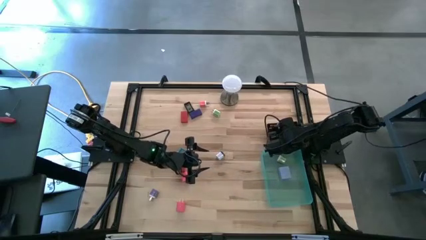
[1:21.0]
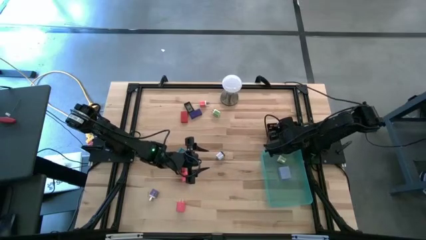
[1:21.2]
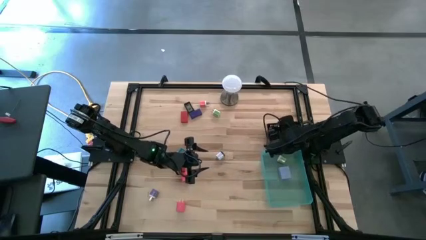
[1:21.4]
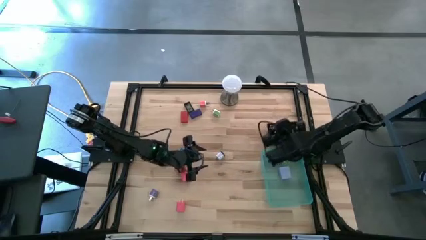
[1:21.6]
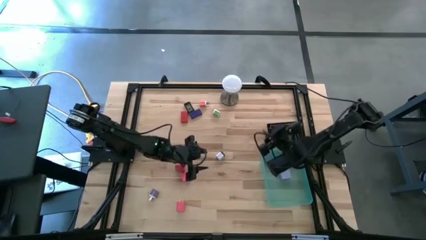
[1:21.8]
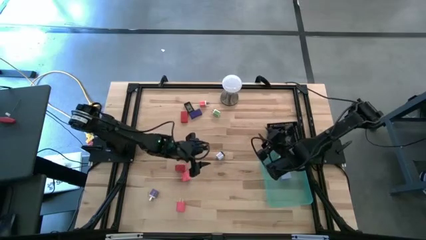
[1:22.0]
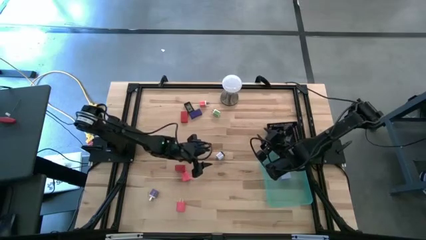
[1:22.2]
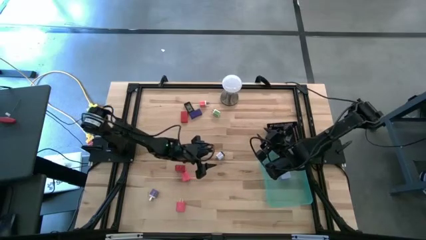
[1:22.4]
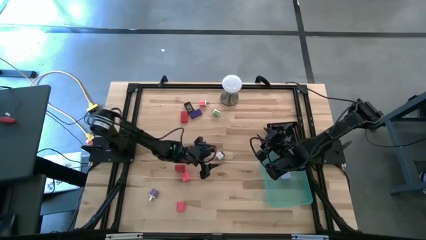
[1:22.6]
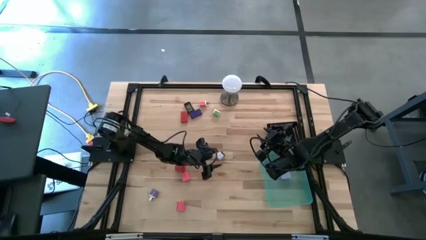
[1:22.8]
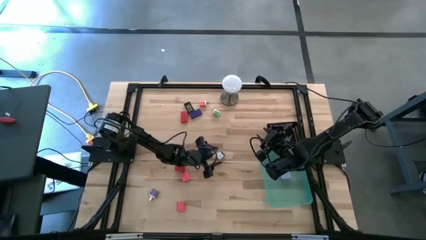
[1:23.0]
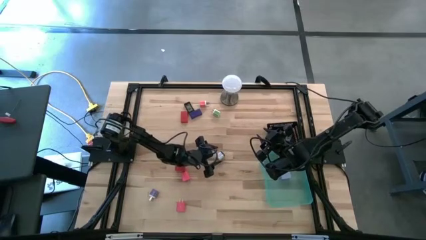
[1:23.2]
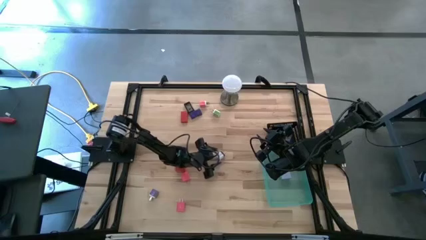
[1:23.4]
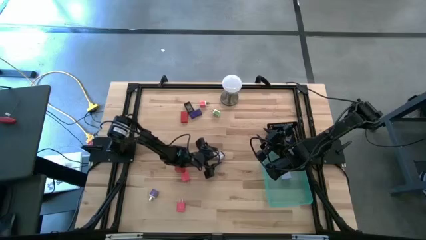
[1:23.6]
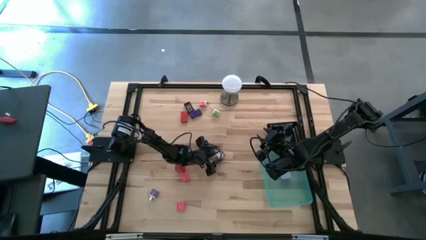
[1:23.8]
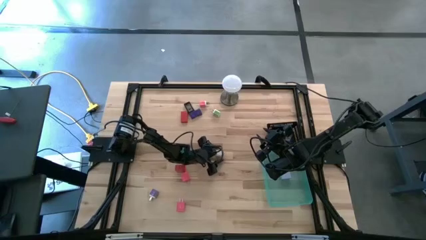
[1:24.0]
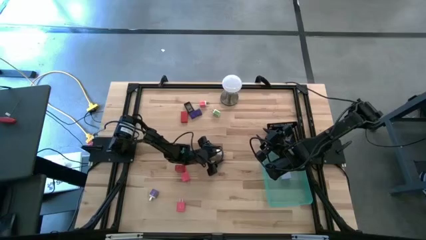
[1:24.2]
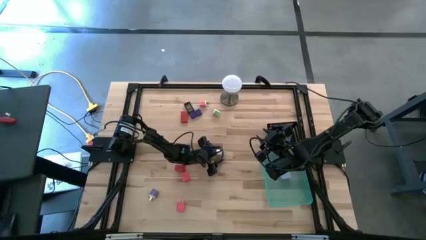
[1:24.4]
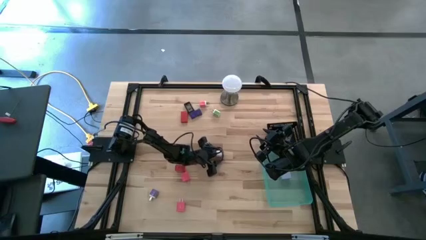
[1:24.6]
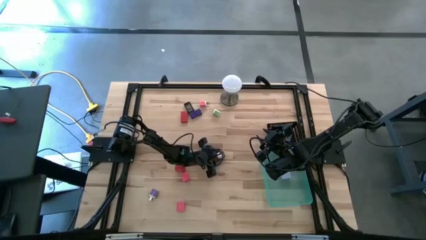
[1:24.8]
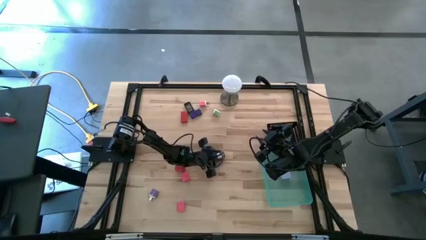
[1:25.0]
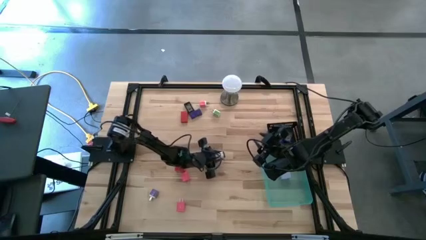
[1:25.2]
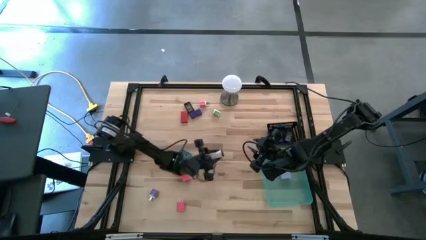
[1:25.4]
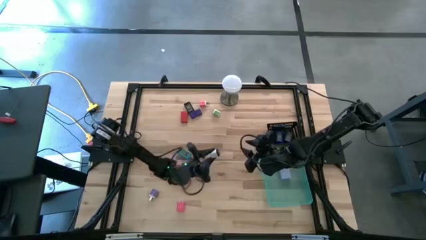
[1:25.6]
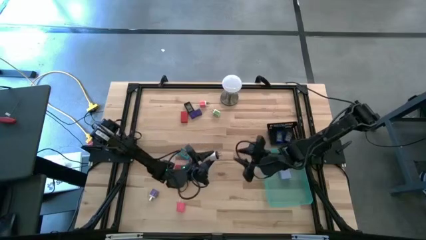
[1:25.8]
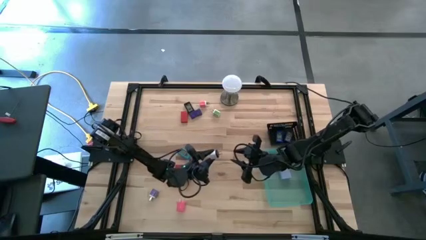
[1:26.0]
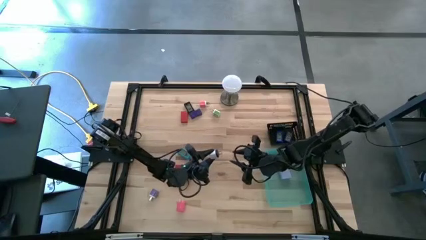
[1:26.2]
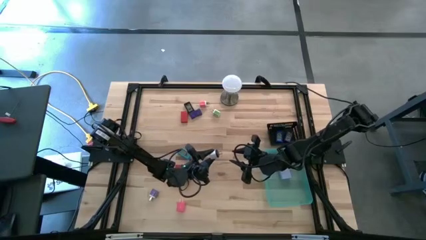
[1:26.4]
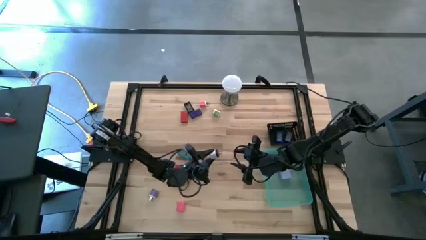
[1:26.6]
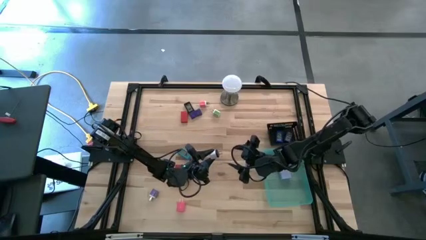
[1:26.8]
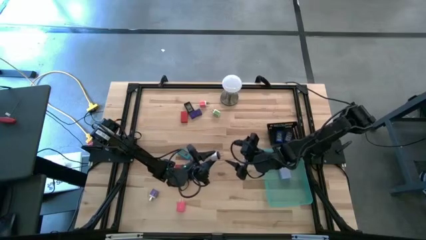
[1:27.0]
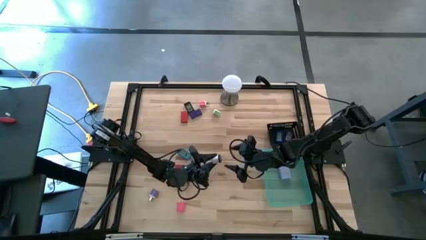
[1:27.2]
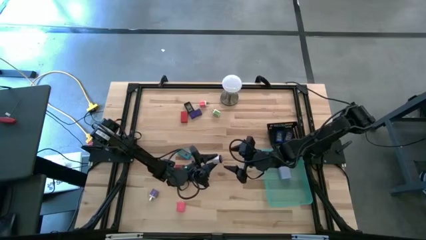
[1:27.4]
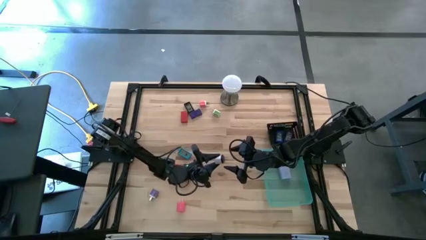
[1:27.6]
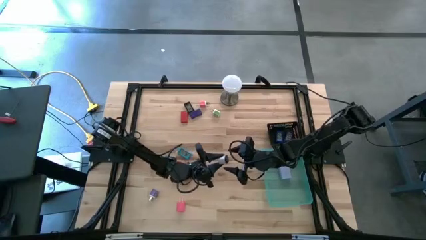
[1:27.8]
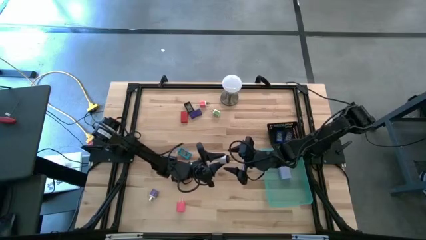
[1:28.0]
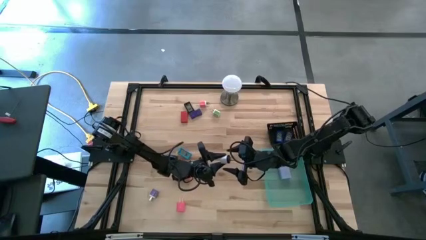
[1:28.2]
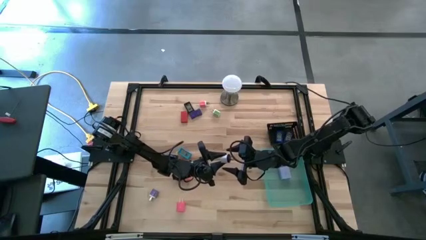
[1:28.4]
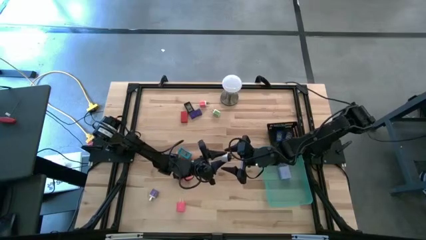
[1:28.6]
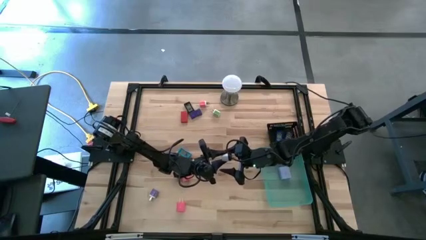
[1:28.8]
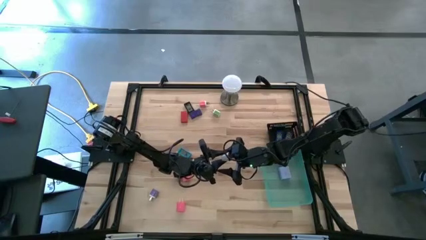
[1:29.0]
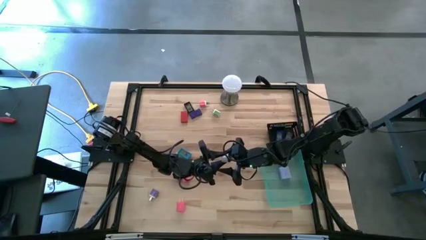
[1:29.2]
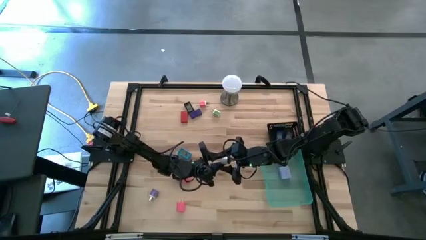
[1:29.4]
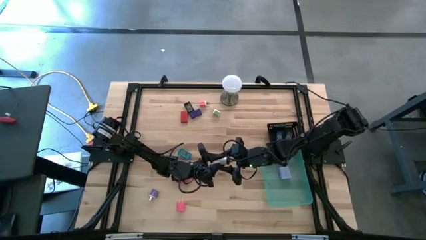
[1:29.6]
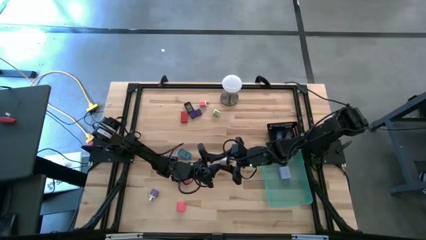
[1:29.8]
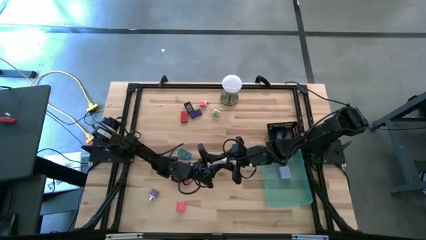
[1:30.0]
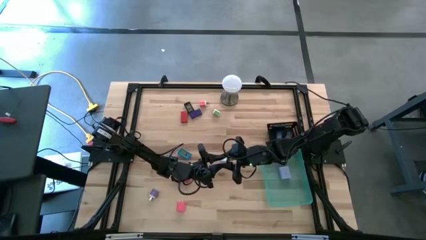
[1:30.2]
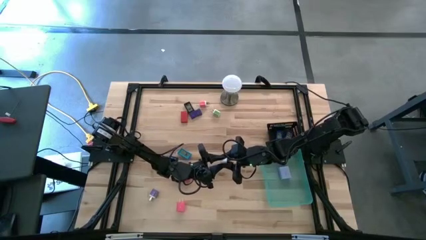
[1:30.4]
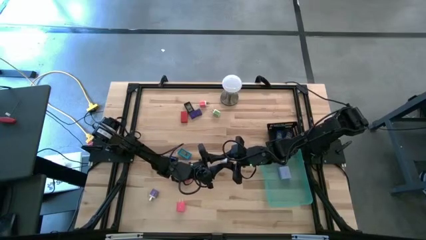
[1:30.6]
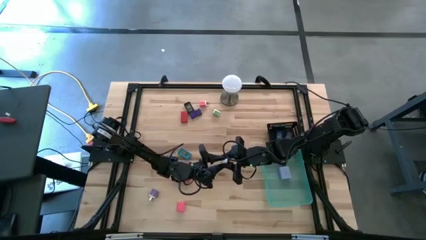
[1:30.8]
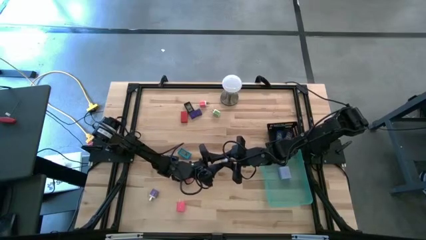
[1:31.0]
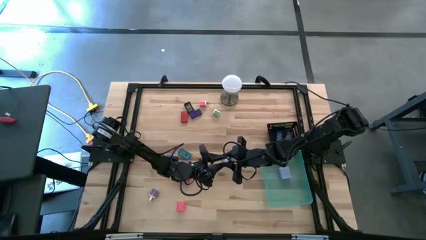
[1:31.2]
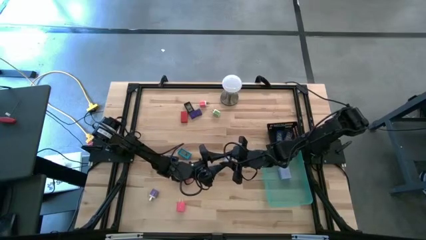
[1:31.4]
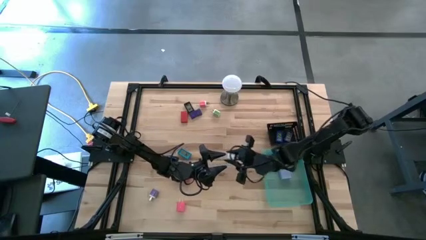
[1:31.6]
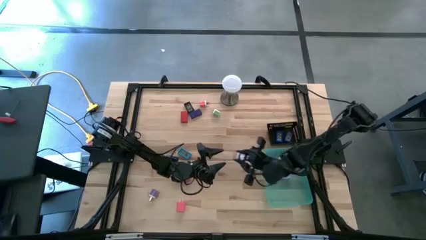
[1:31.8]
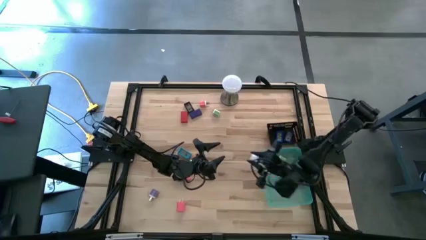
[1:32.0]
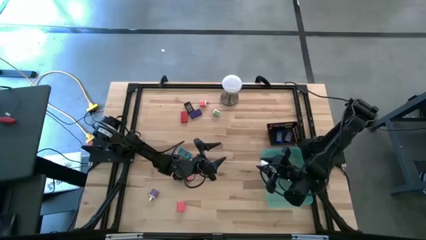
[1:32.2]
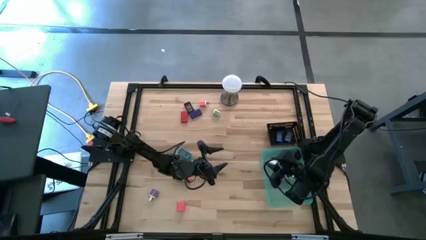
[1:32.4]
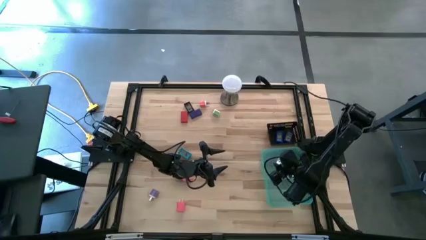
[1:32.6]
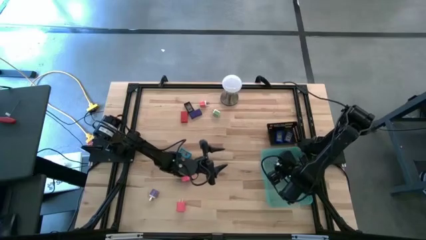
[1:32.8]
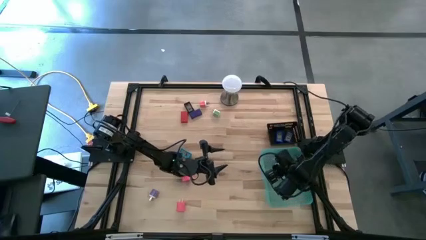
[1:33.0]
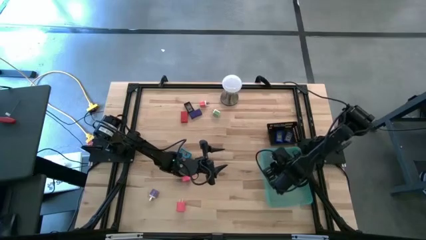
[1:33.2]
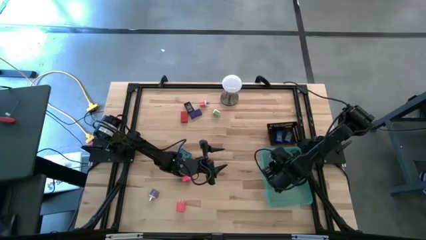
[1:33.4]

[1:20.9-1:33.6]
Task: Pick & Place Office items
Put the white charger adapter into the green bin

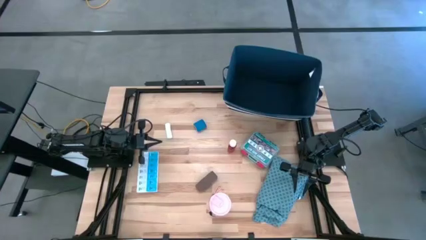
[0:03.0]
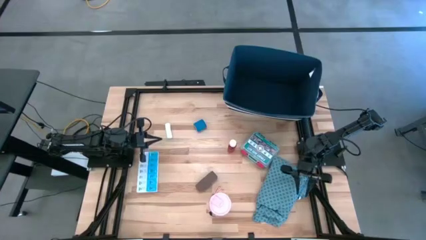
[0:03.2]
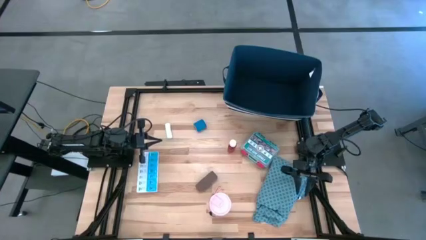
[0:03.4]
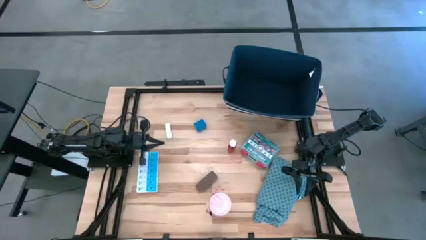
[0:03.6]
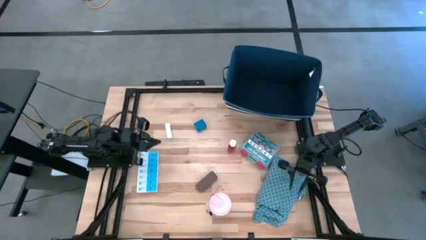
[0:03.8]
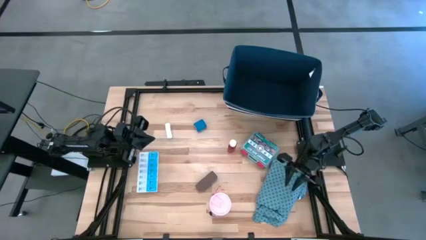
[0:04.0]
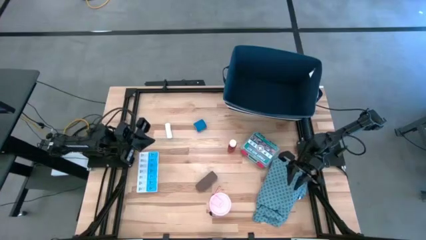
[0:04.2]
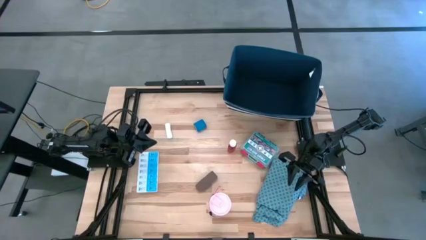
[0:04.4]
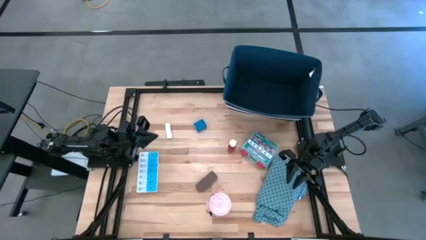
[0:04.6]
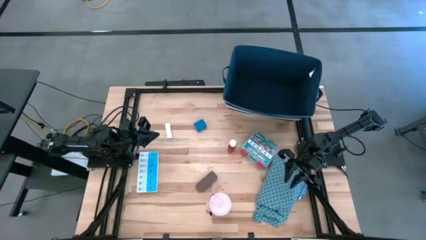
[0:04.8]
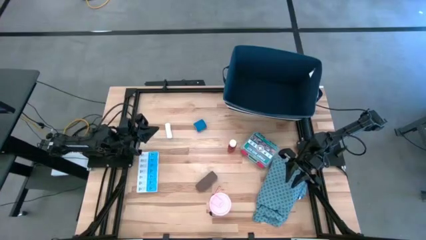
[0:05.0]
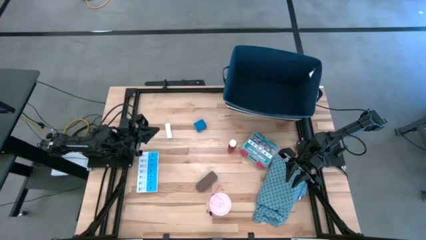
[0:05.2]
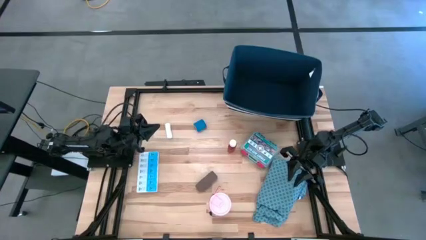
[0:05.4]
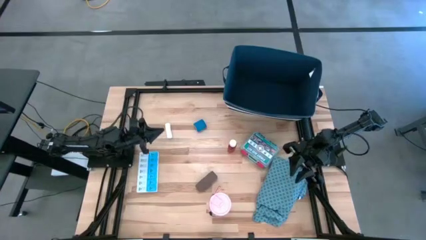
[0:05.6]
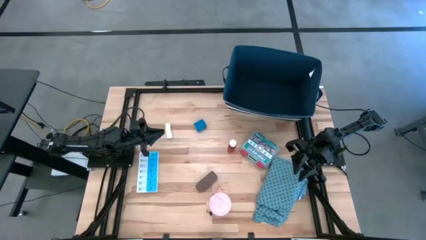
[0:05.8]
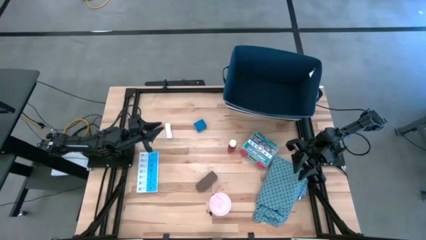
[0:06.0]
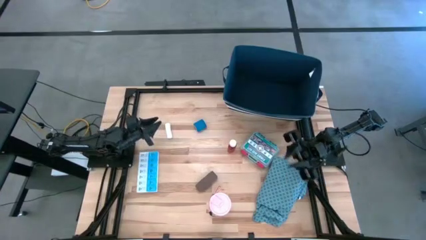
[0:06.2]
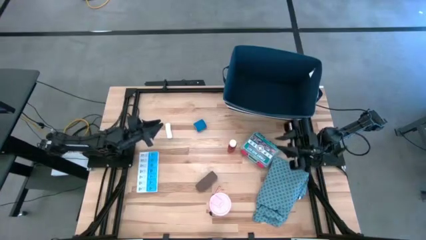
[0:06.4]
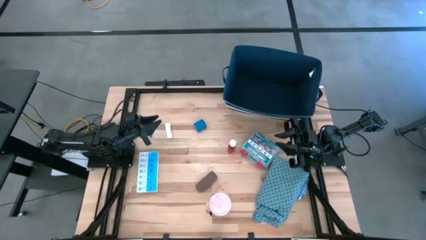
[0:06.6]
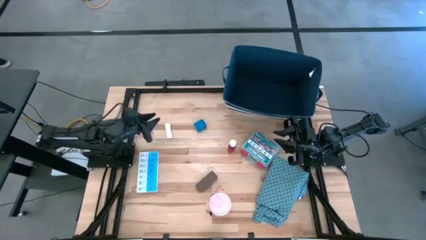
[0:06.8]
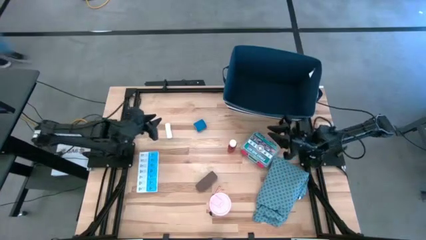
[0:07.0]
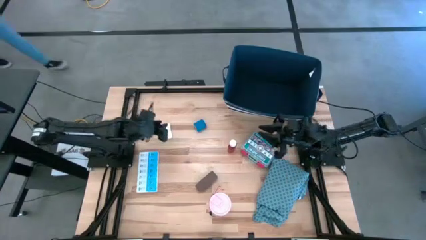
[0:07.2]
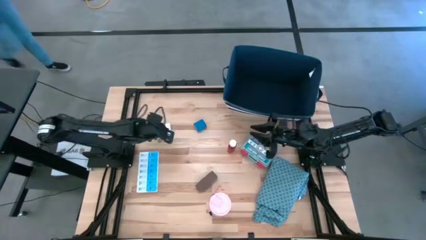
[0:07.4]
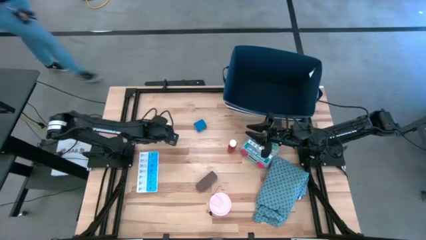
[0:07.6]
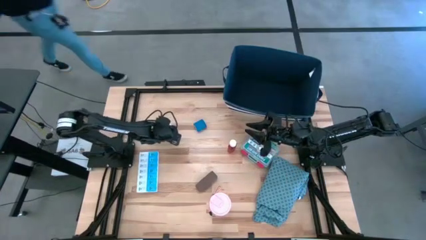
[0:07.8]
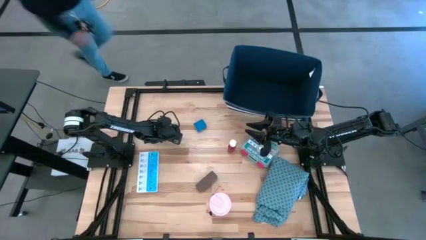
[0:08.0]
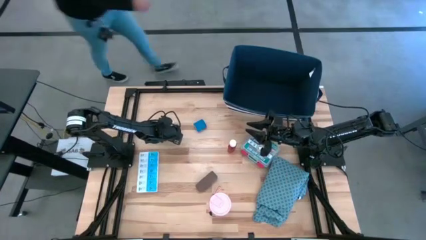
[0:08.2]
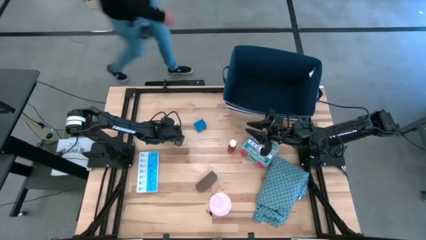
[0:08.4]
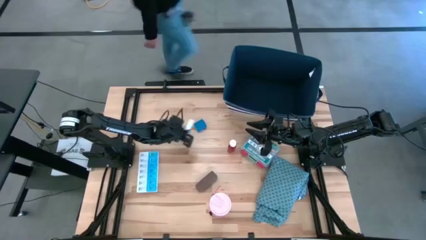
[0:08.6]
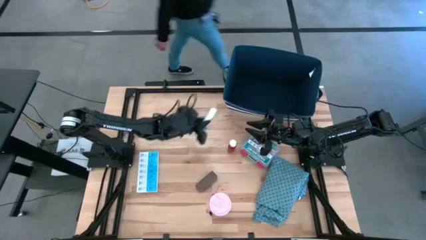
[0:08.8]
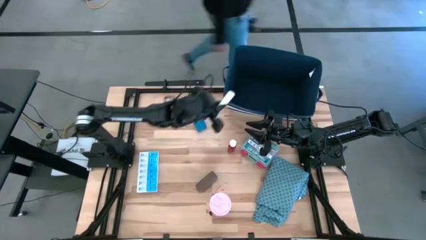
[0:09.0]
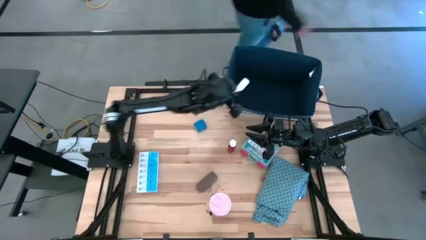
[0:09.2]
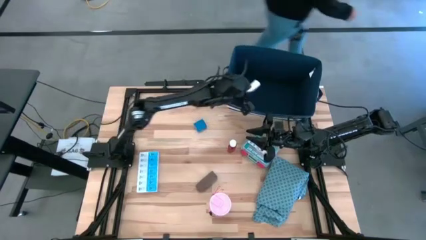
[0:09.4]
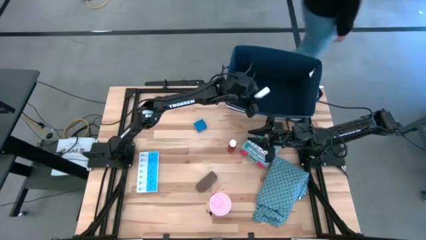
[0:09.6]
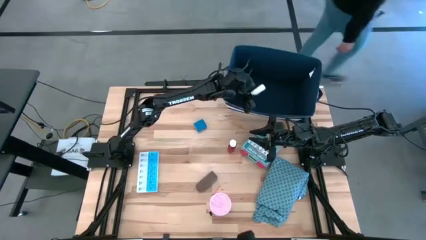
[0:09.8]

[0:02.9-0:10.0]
Task: Pick & place medical supplies in basket/bin
Put the white gauze into the white bin
